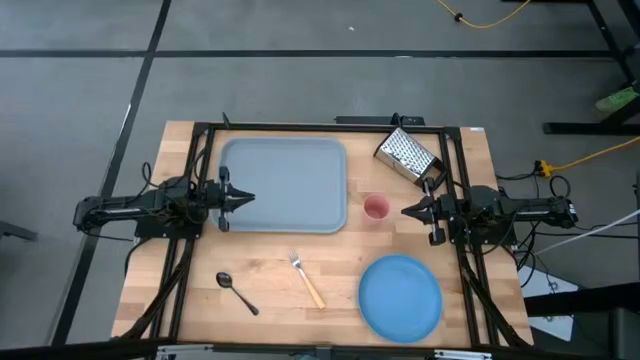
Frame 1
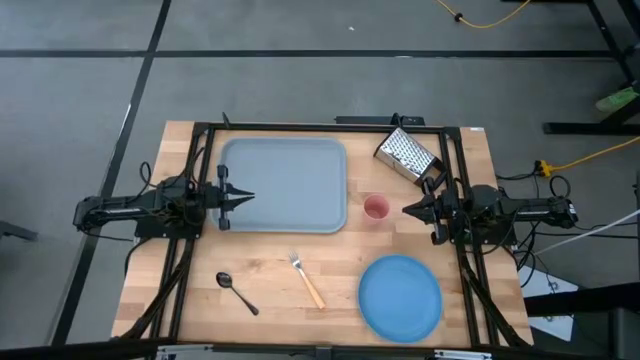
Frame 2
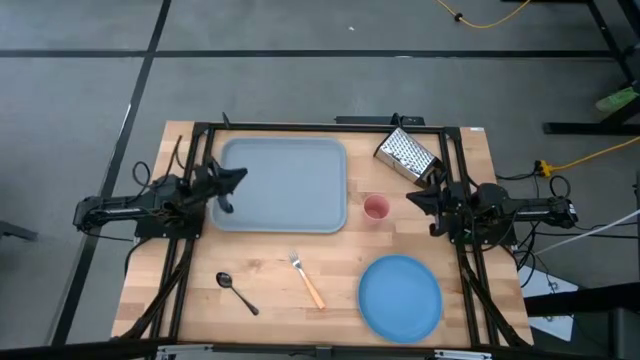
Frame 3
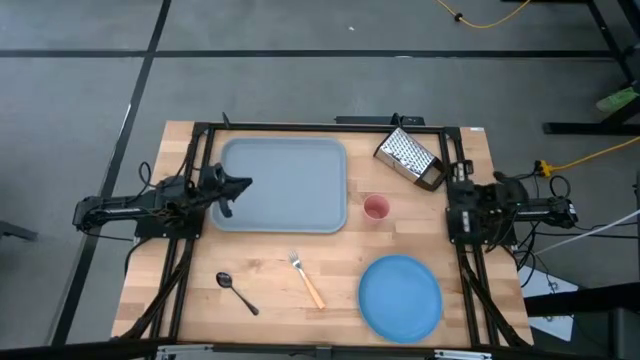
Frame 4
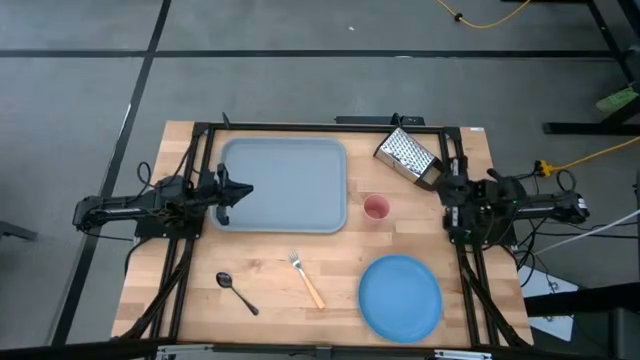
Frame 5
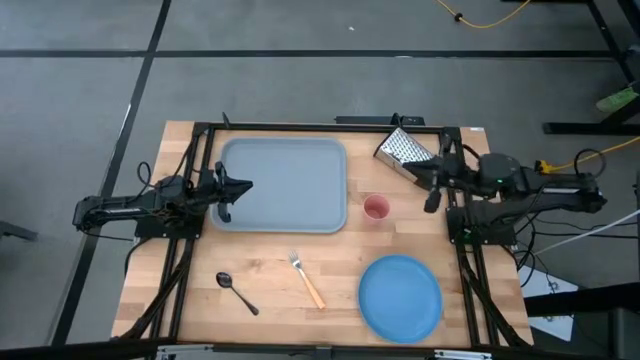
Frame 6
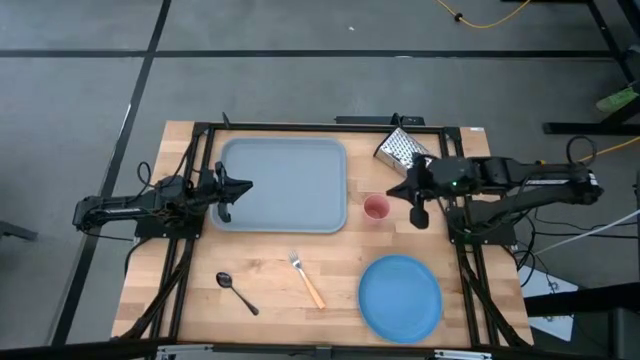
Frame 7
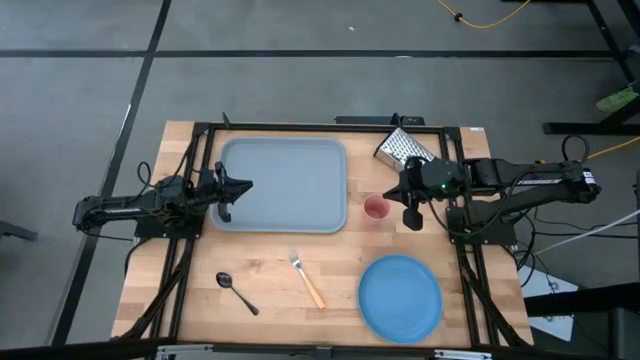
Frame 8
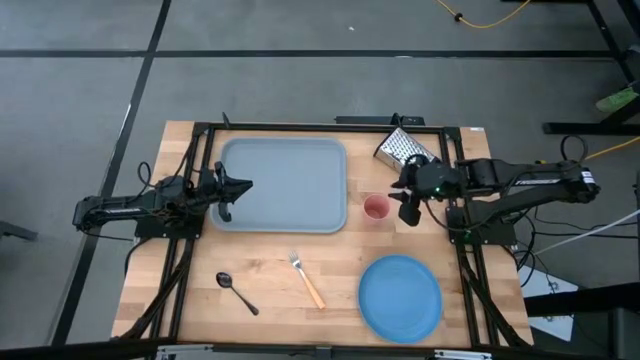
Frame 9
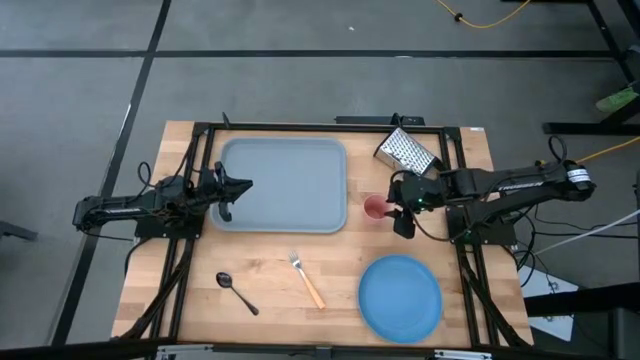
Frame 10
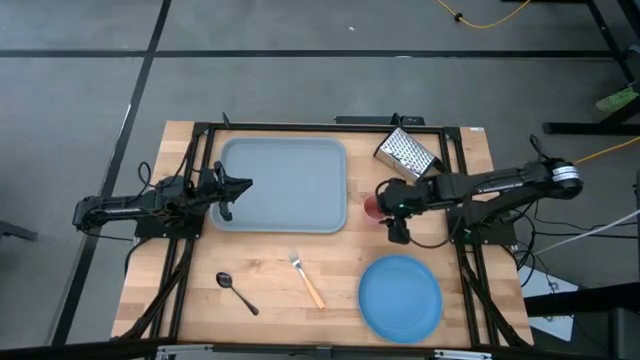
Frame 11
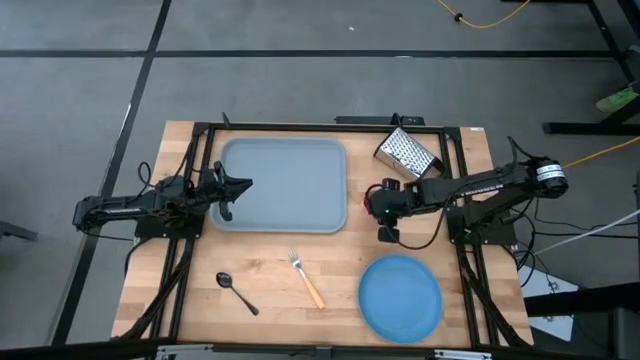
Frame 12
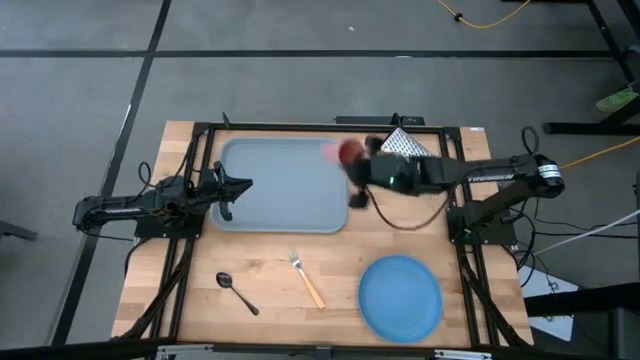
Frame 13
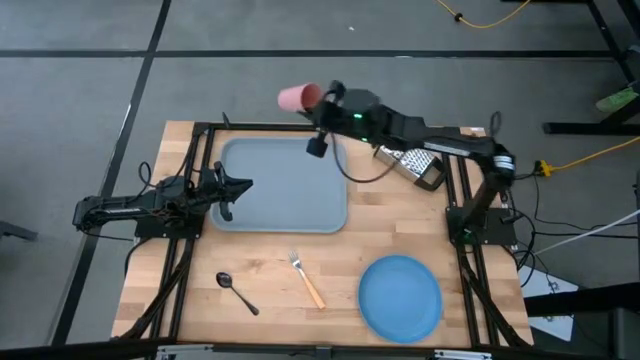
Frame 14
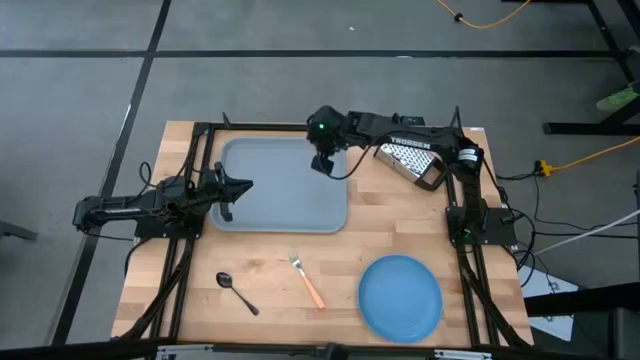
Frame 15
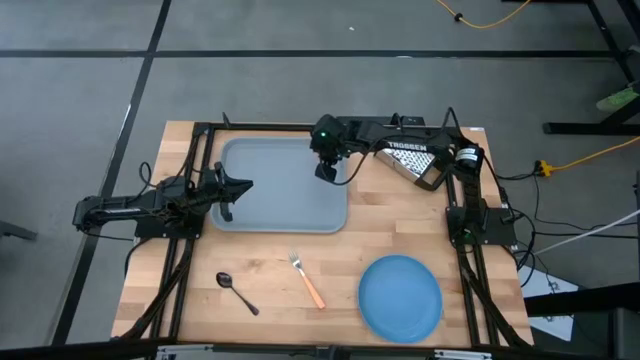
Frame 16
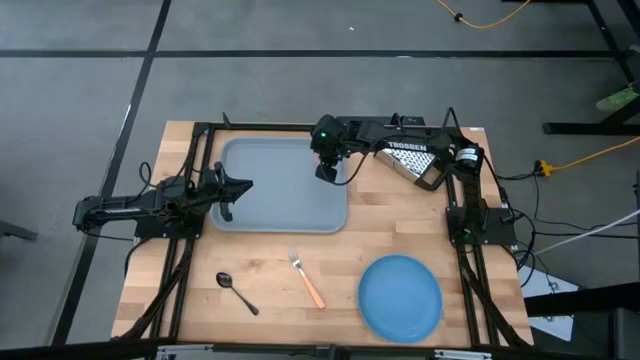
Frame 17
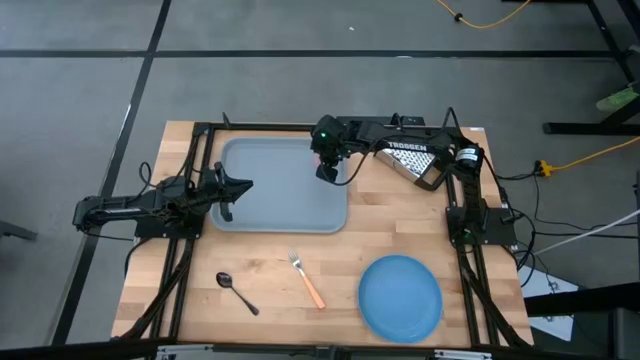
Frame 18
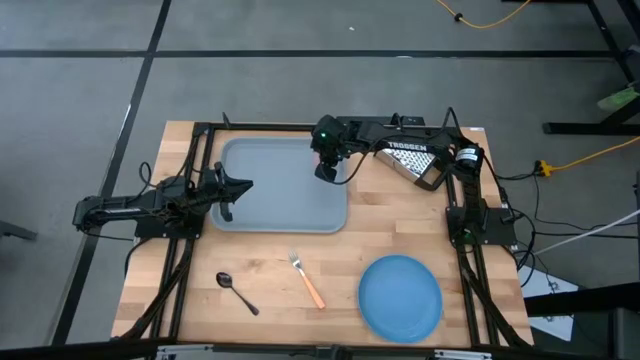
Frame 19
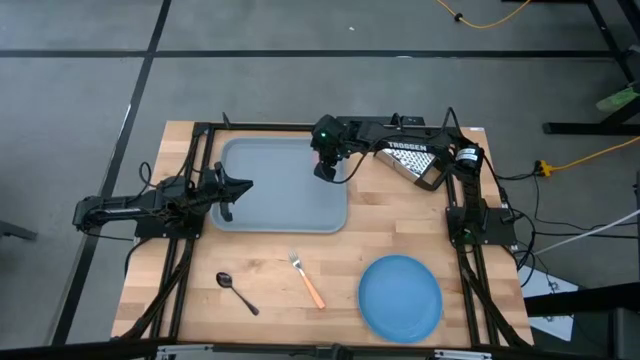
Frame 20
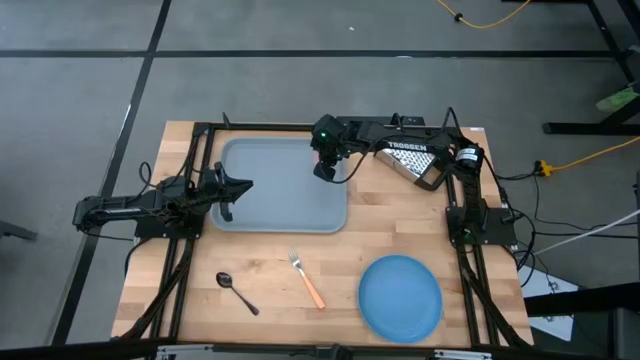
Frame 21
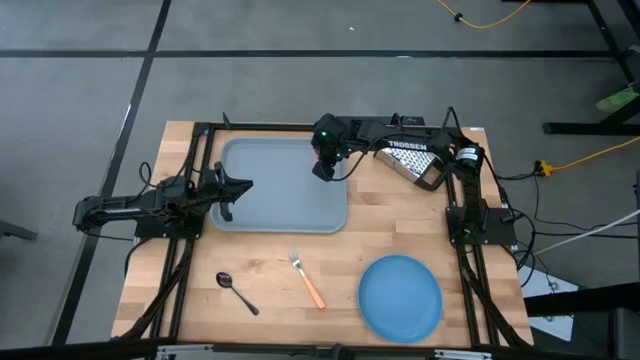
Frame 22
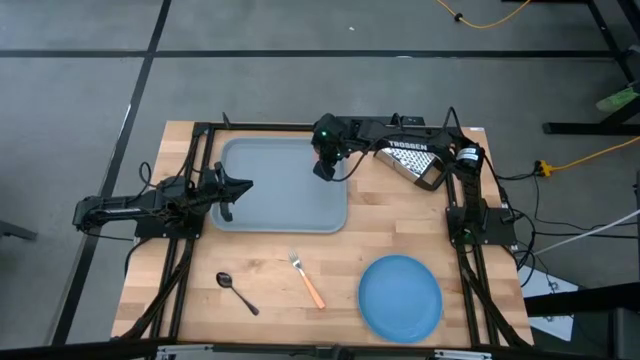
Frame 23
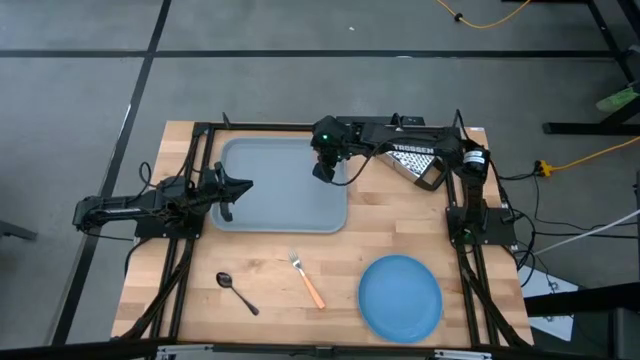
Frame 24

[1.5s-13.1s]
Task: Pick and place plate/cup/fork/spoon on tray
Put the pink cup to the top right of the serving tray

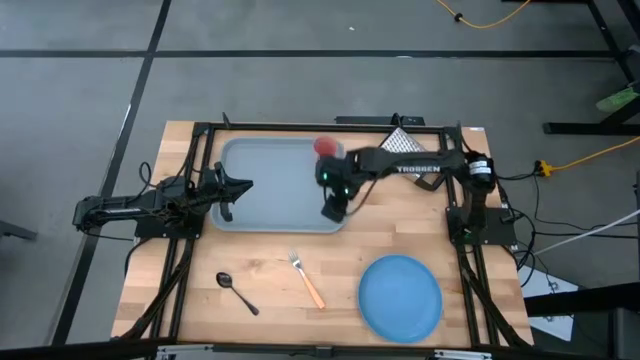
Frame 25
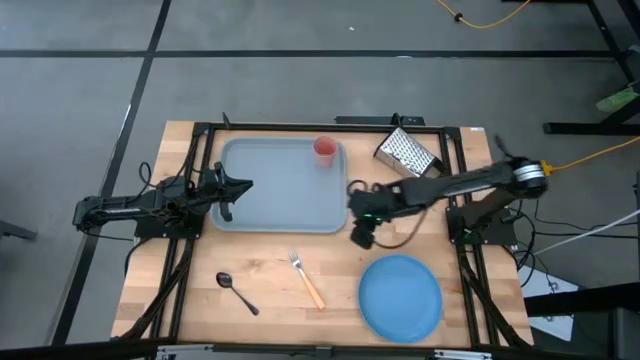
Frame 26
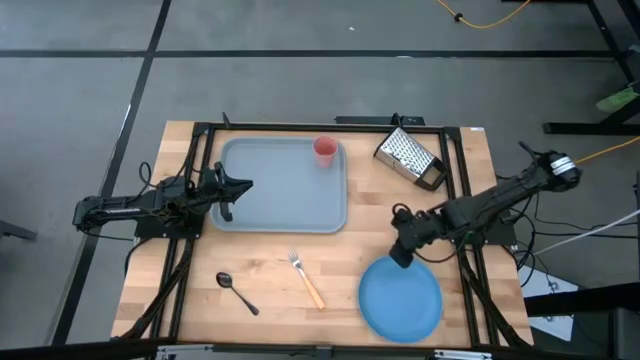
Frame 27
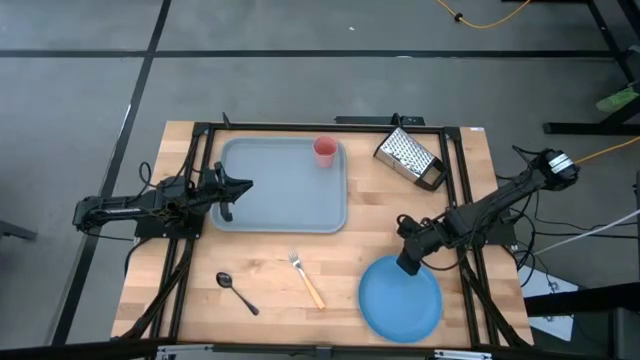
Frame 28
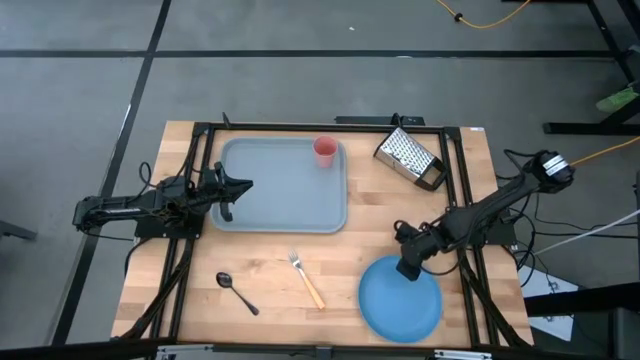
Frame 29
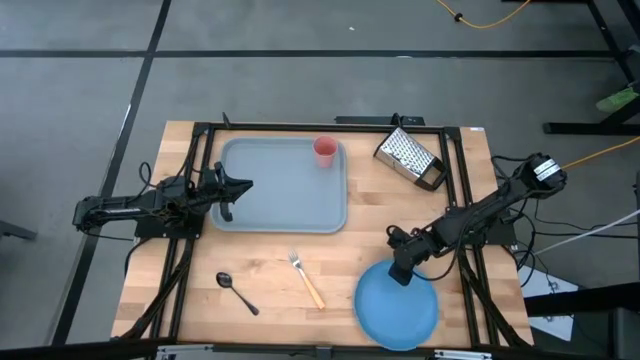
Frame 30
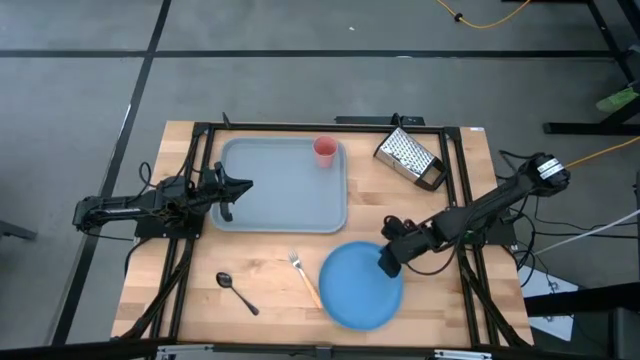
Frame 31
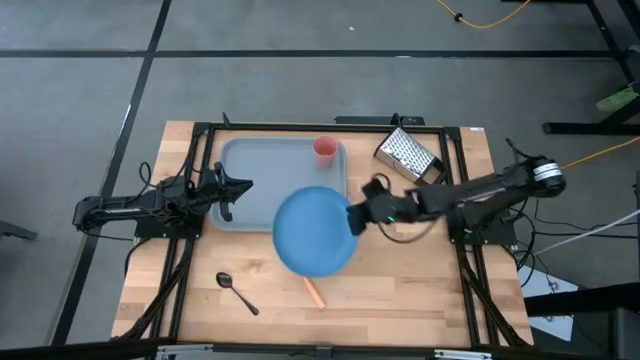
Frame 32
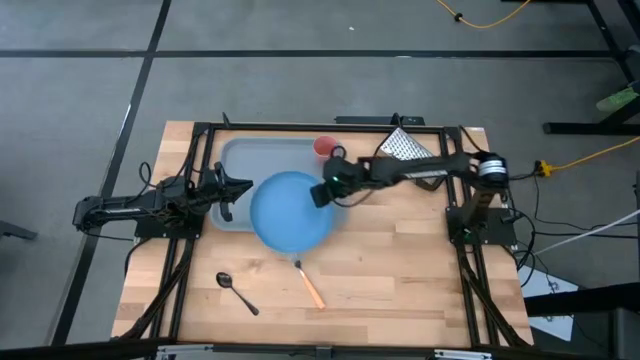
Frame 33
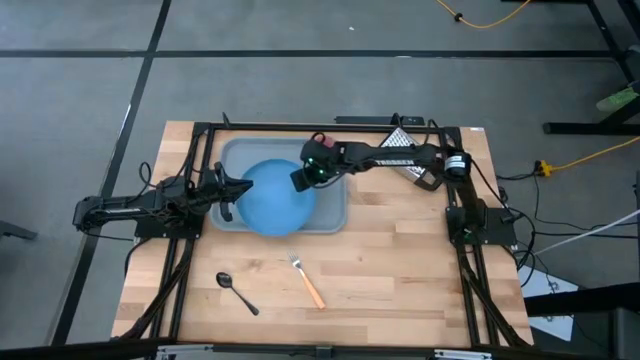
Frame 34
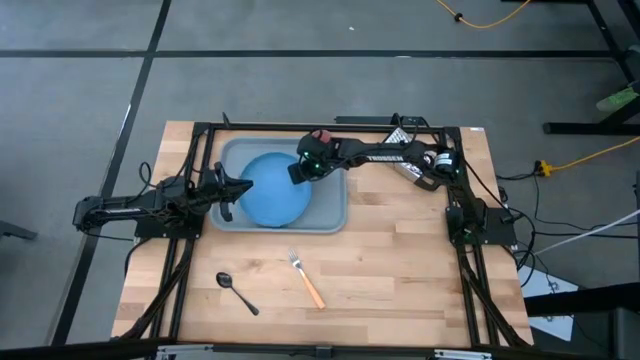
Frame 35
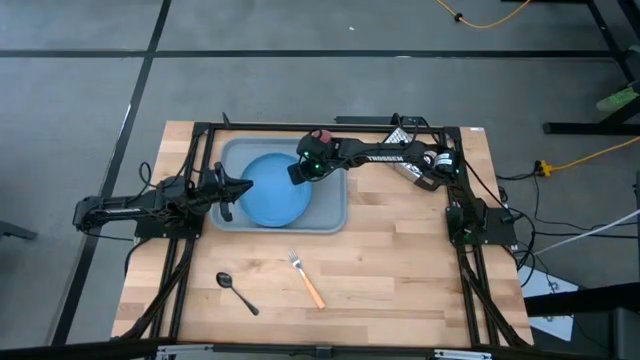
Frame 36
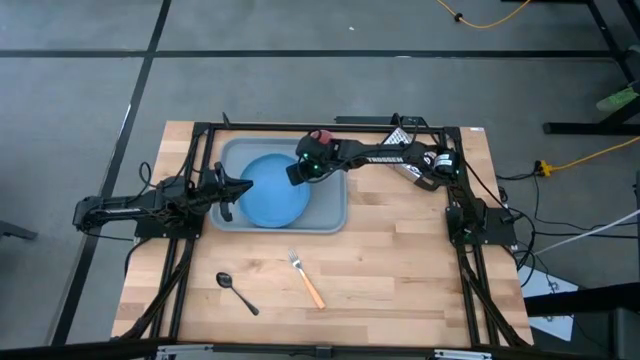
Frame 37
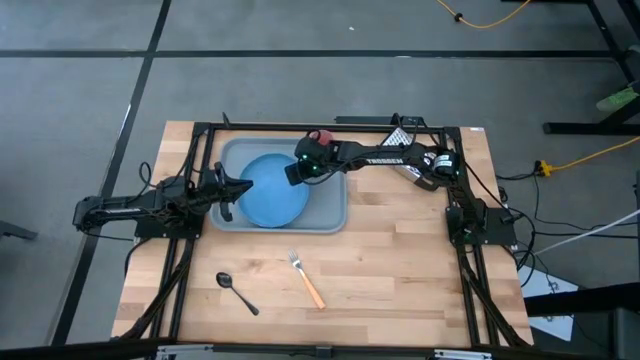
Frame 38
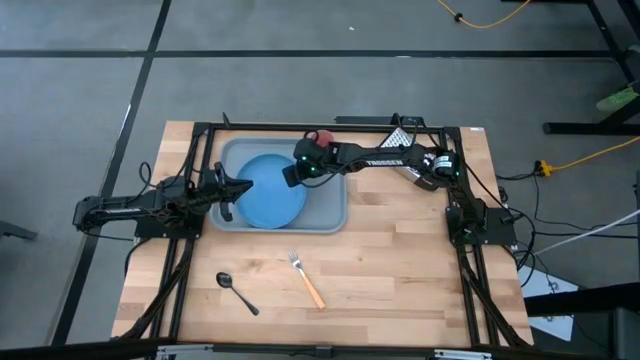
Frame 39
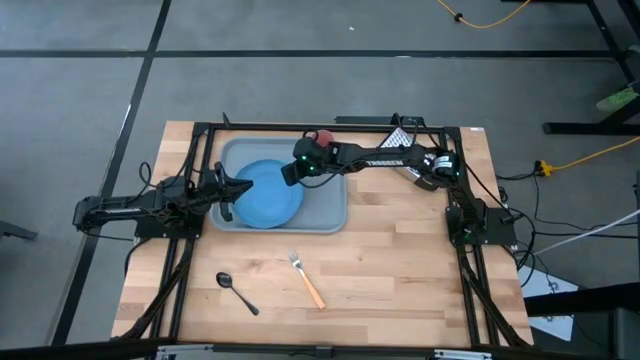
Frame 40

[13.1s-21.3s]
Put the blue plate to the bottom left of the pink cup on the serving tray

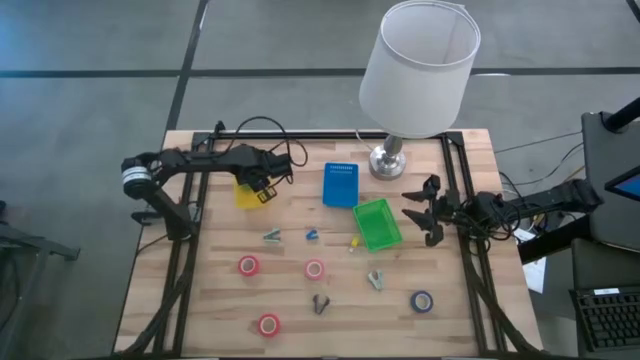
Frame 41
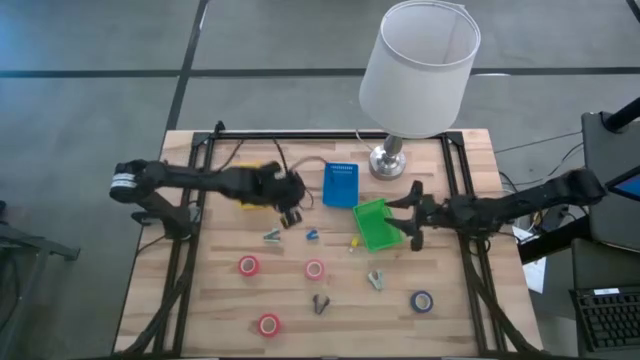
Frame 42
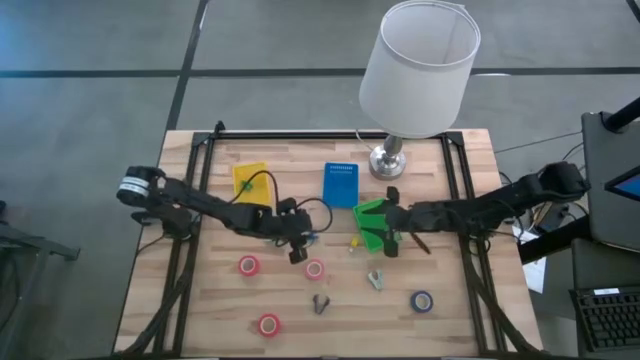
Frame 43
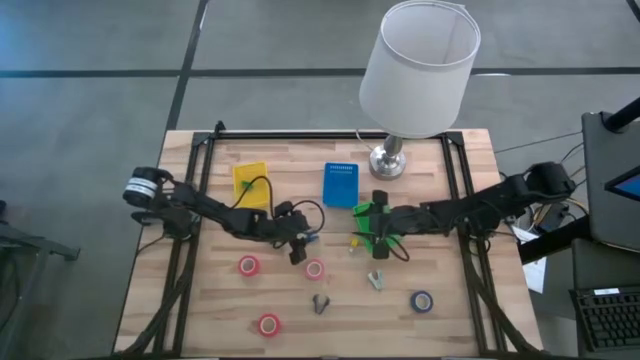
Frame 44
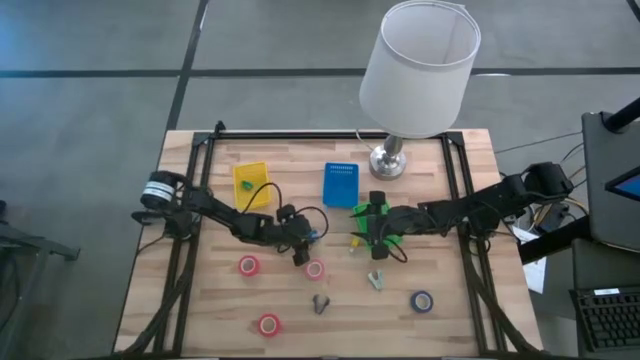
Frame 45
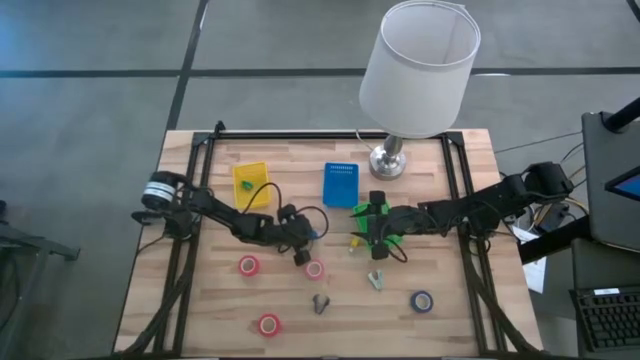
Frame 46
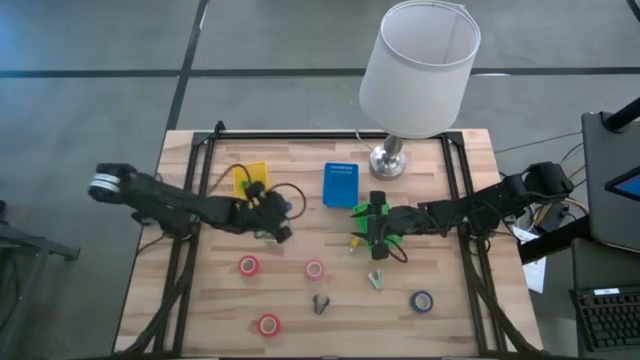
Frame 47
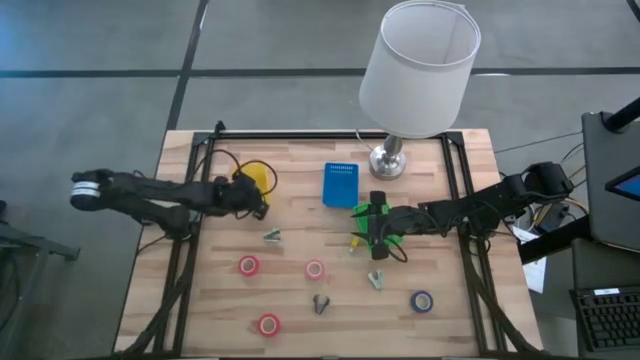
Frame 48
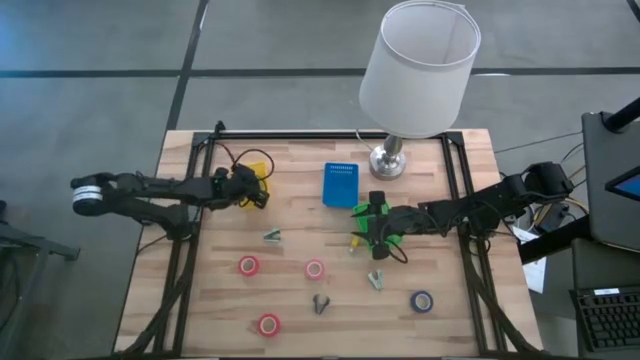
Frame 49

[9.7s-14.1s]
Task: Pick and place Stapler, Stapler remover, tape
Put the blue stapler into the yellow basket
